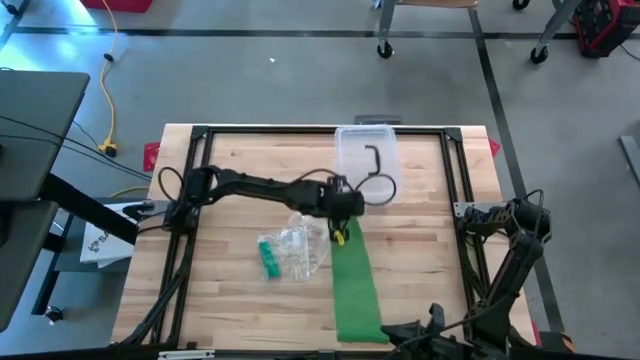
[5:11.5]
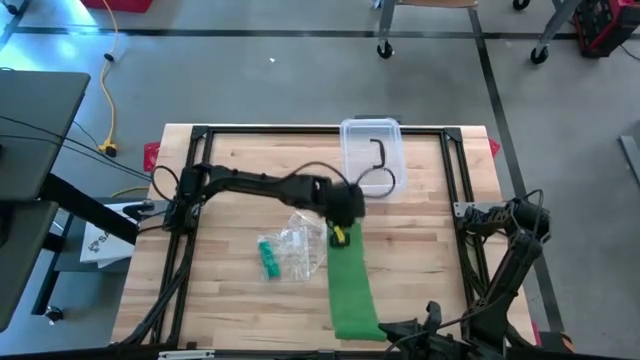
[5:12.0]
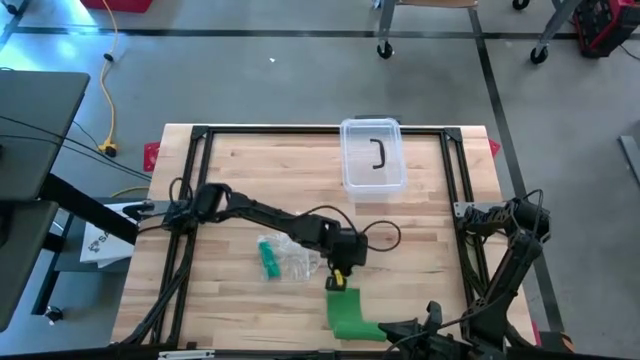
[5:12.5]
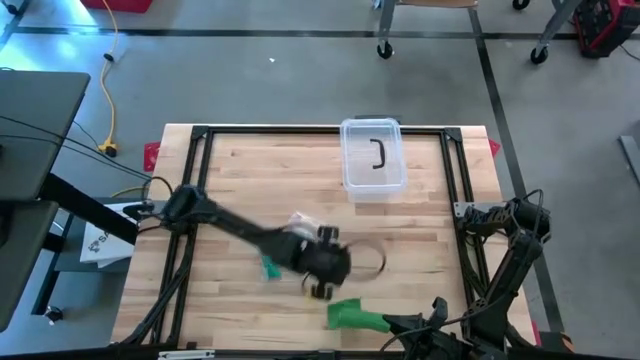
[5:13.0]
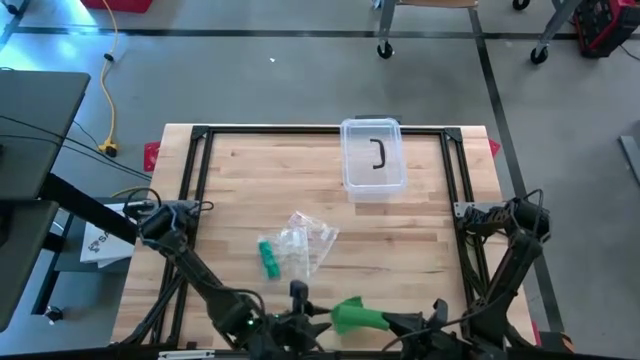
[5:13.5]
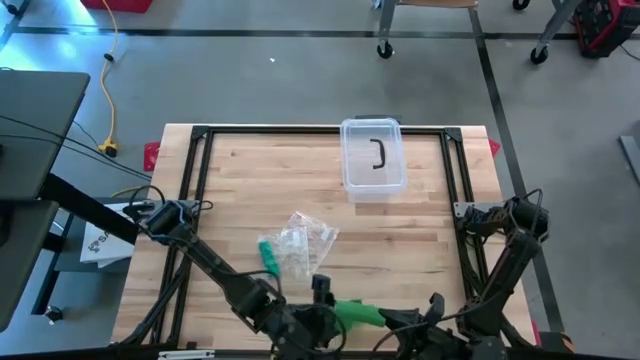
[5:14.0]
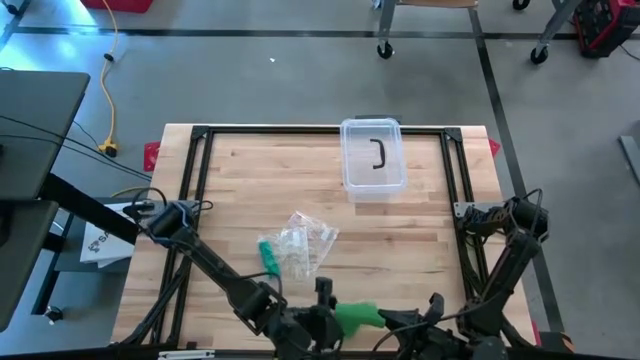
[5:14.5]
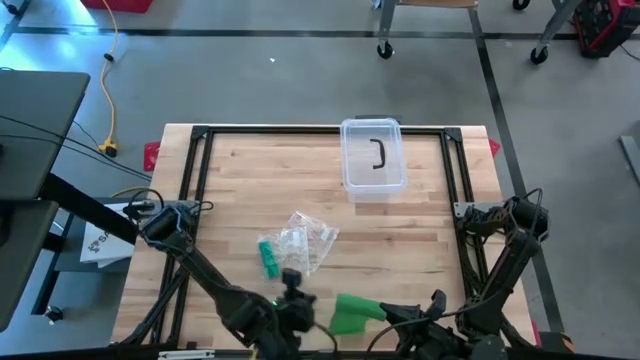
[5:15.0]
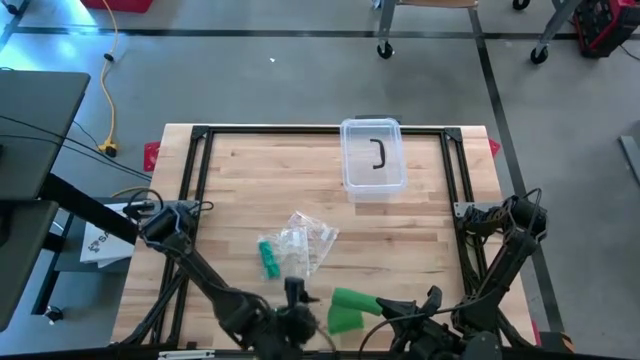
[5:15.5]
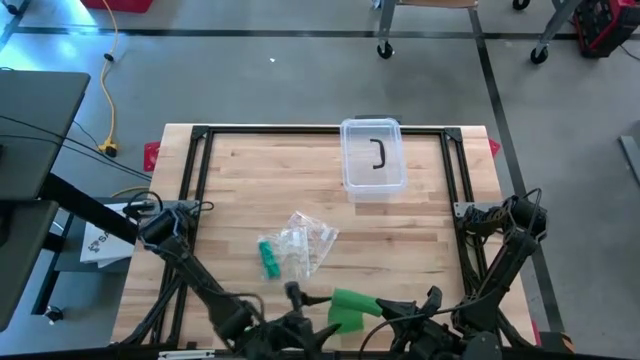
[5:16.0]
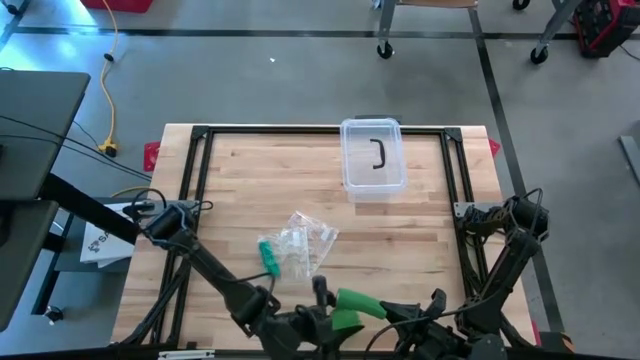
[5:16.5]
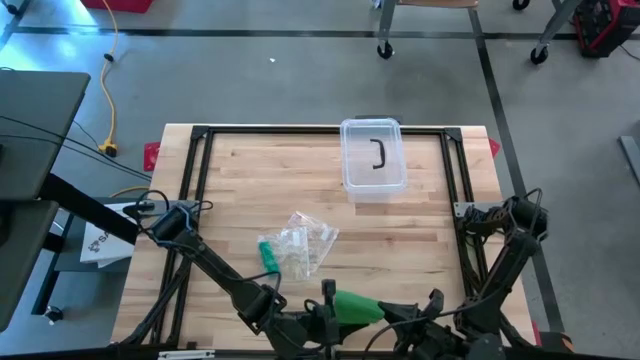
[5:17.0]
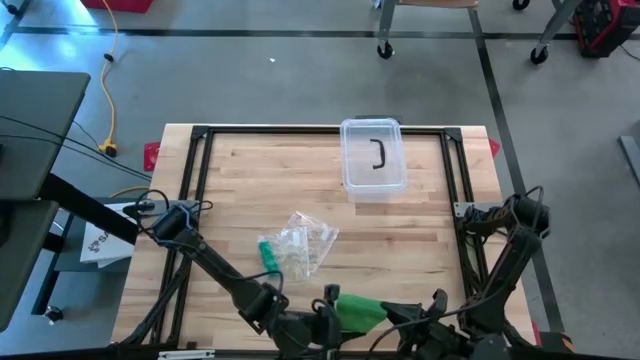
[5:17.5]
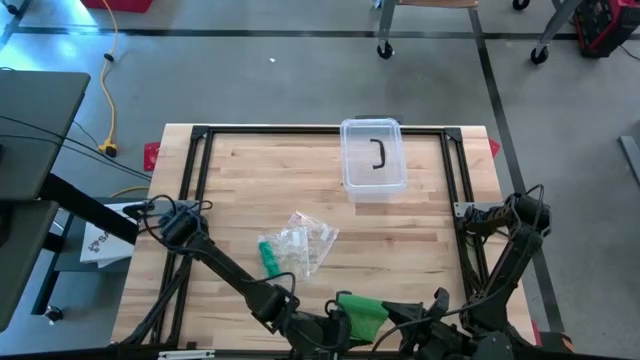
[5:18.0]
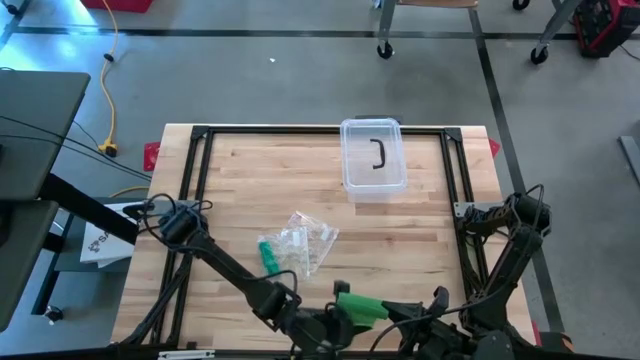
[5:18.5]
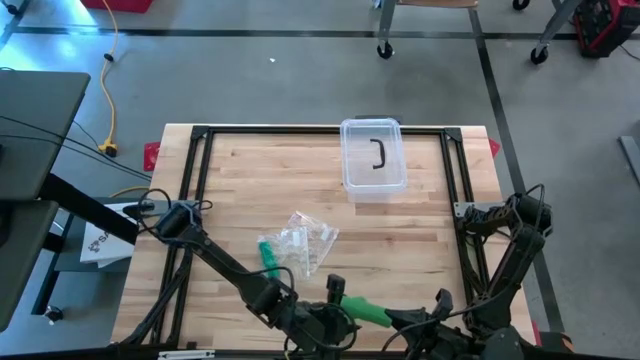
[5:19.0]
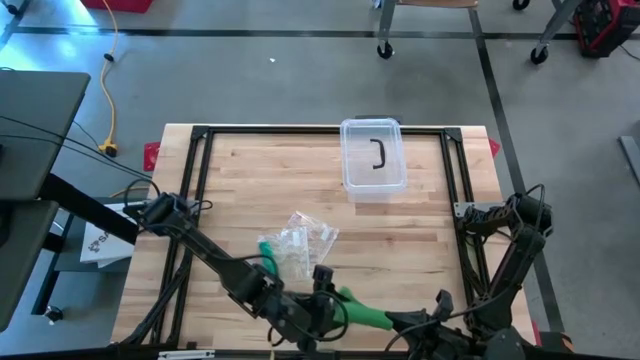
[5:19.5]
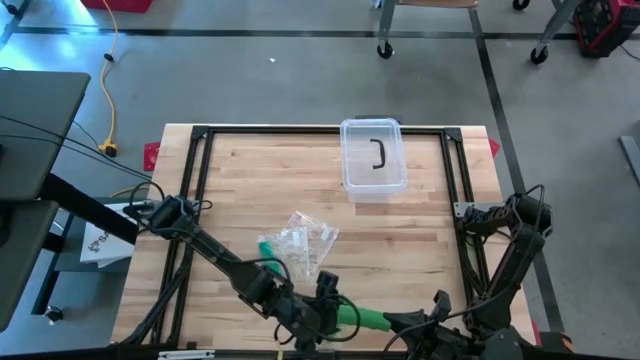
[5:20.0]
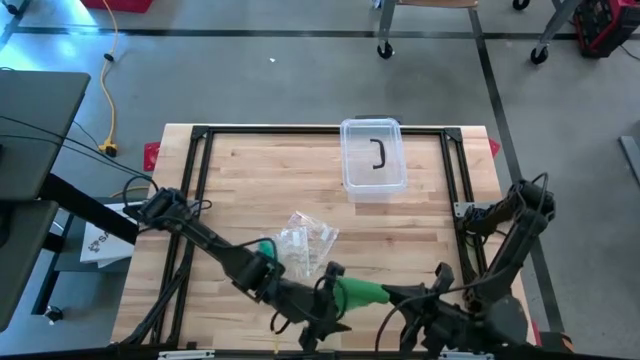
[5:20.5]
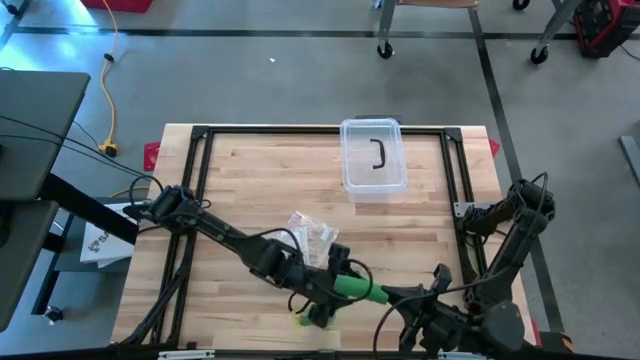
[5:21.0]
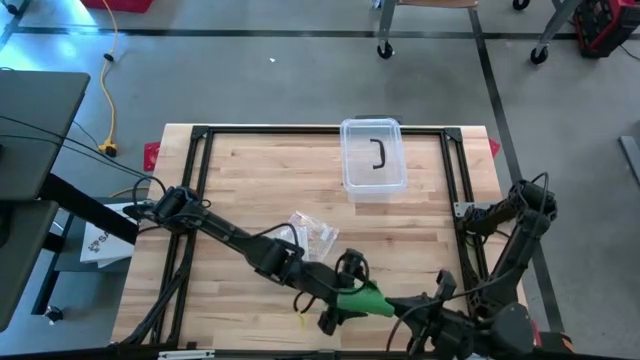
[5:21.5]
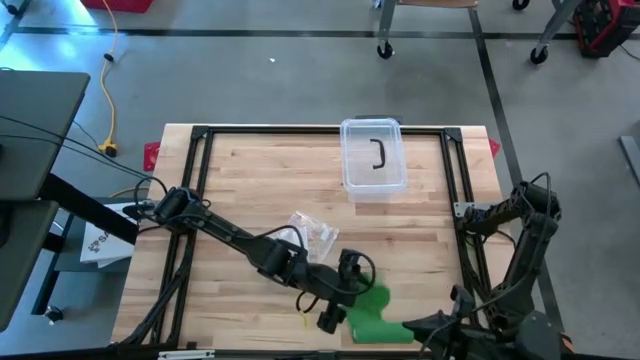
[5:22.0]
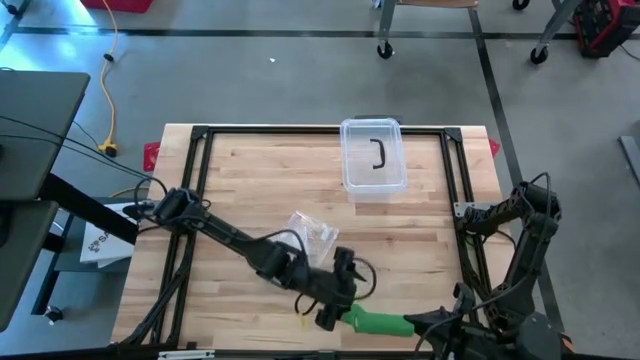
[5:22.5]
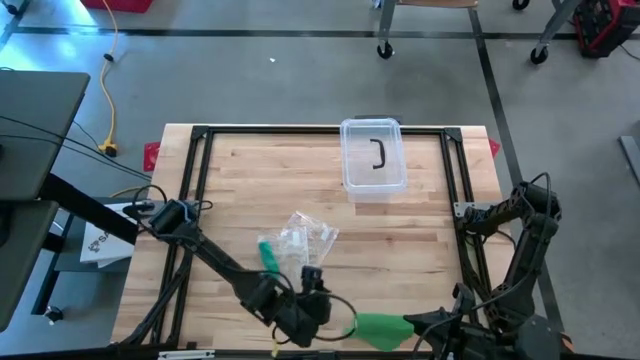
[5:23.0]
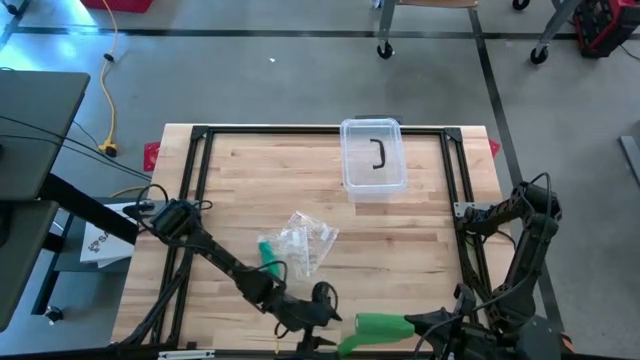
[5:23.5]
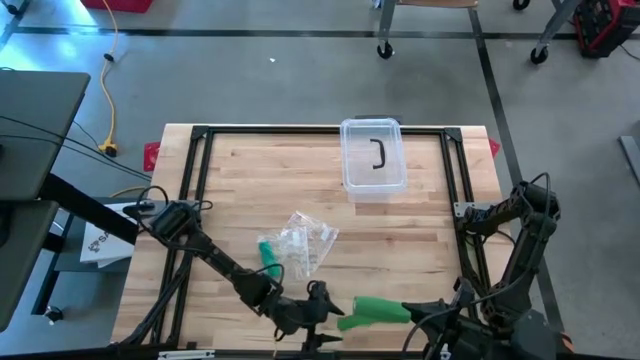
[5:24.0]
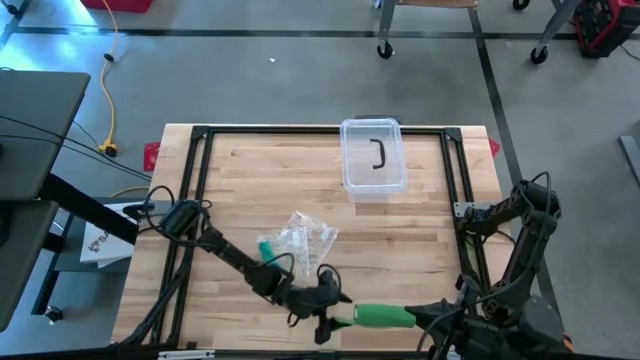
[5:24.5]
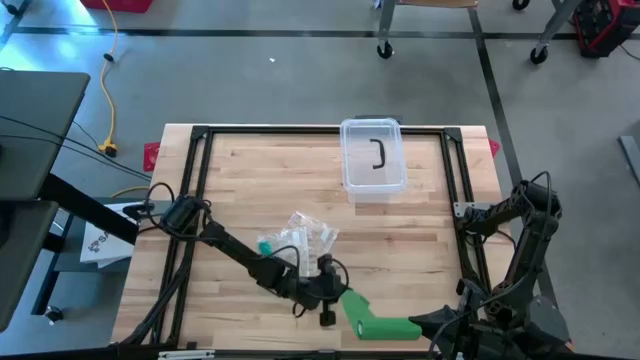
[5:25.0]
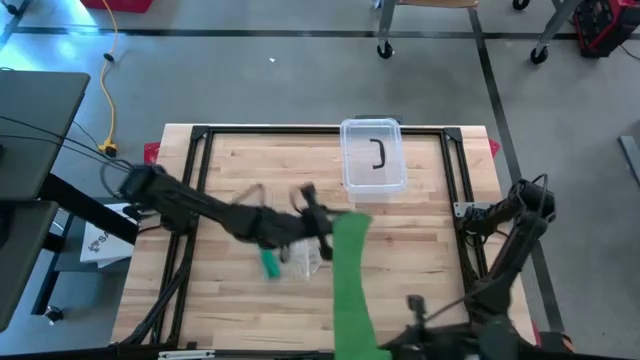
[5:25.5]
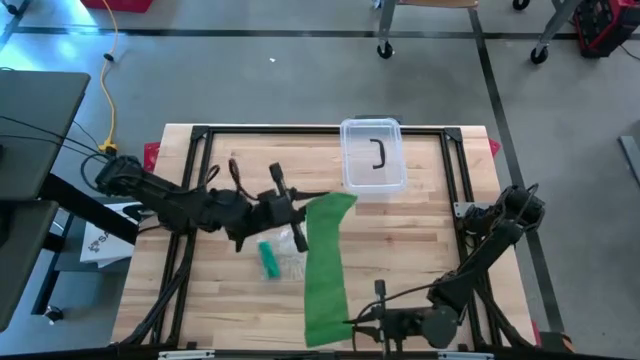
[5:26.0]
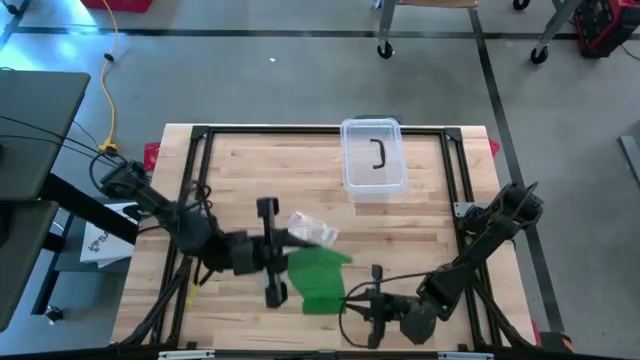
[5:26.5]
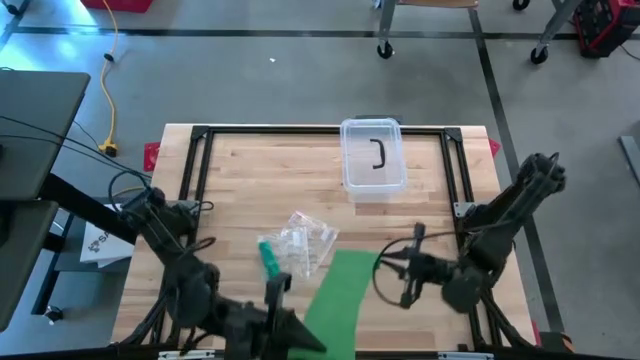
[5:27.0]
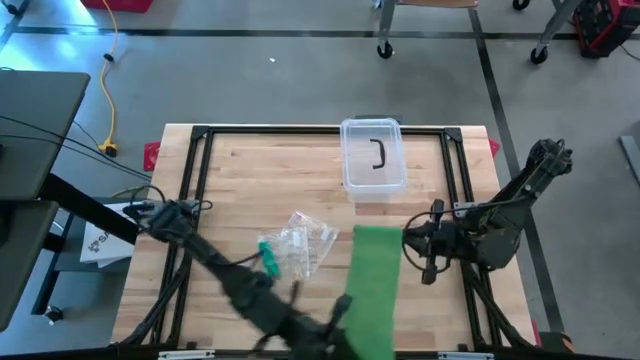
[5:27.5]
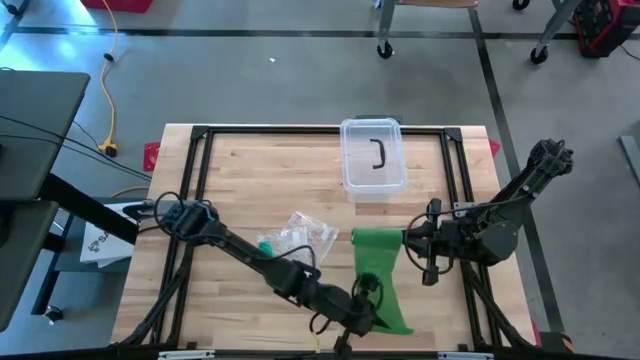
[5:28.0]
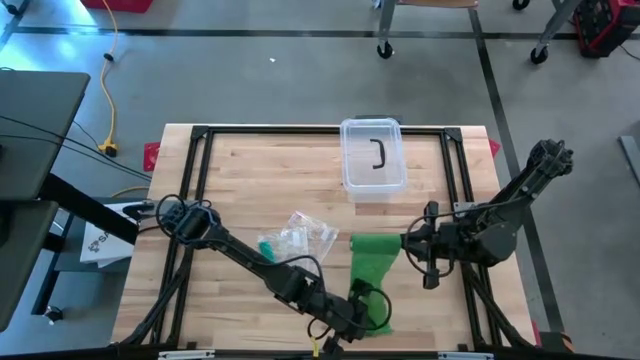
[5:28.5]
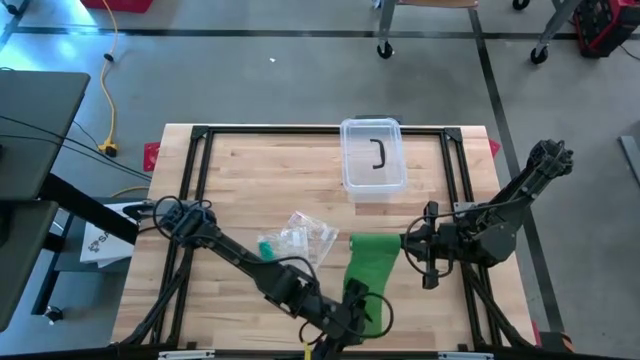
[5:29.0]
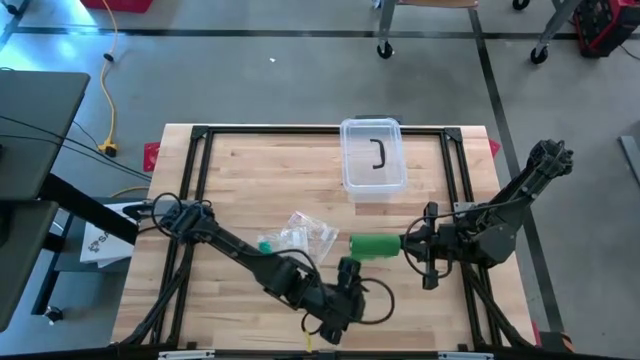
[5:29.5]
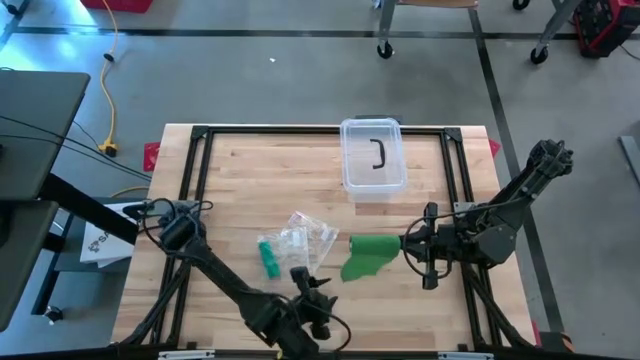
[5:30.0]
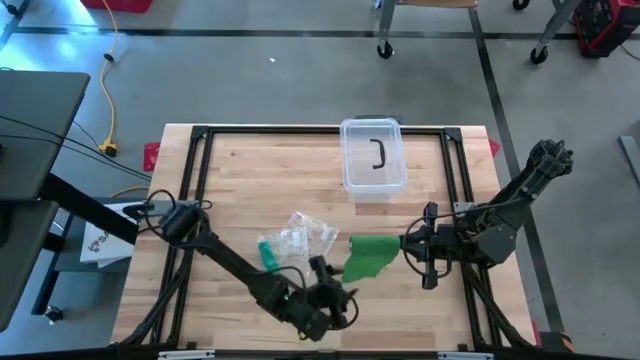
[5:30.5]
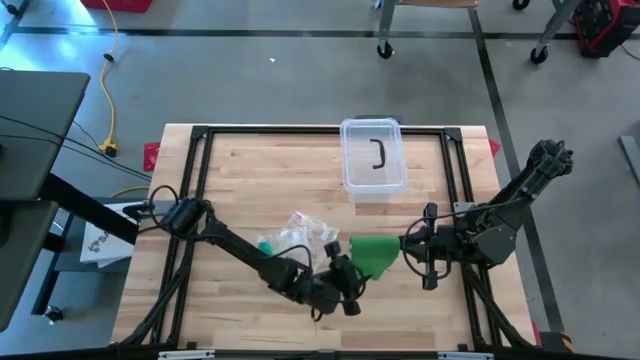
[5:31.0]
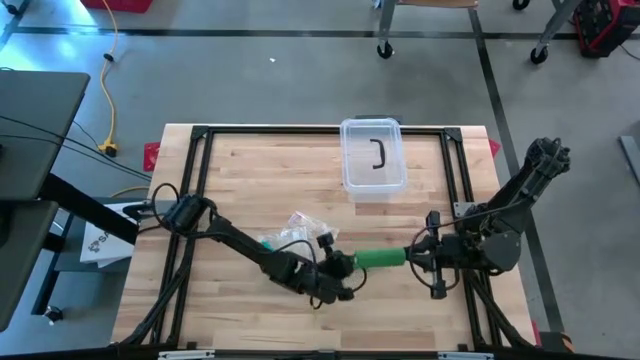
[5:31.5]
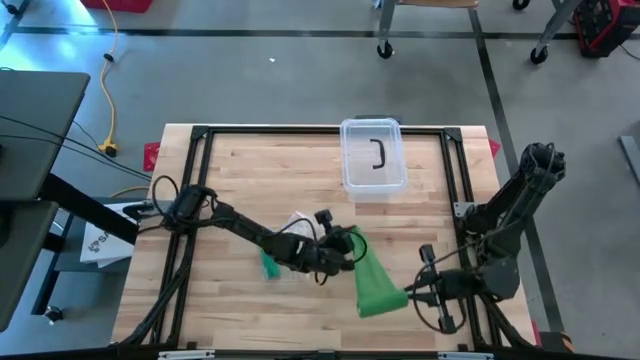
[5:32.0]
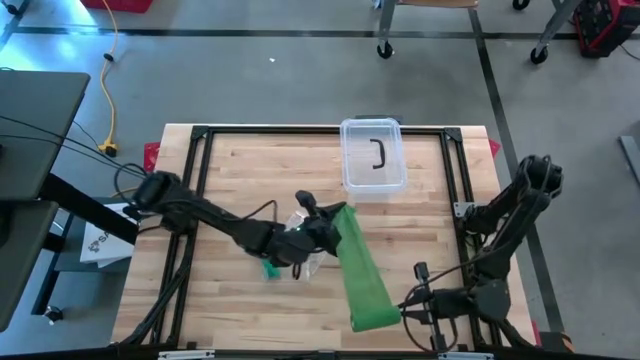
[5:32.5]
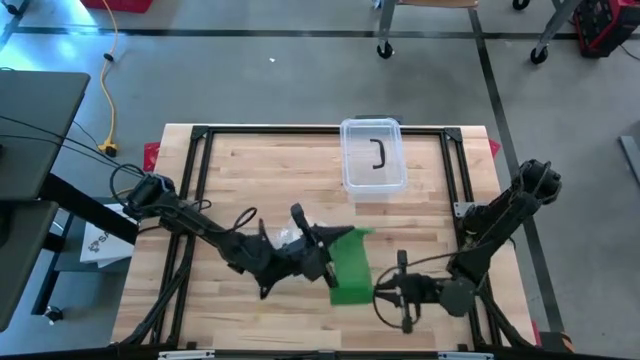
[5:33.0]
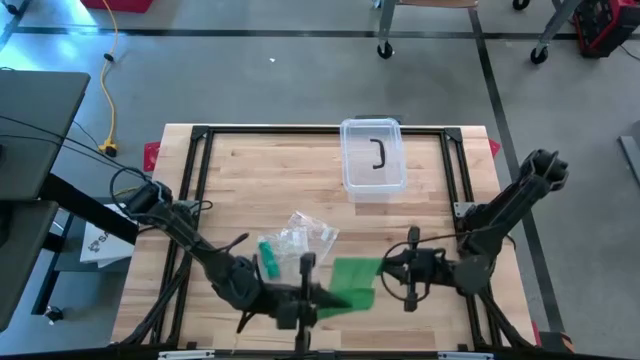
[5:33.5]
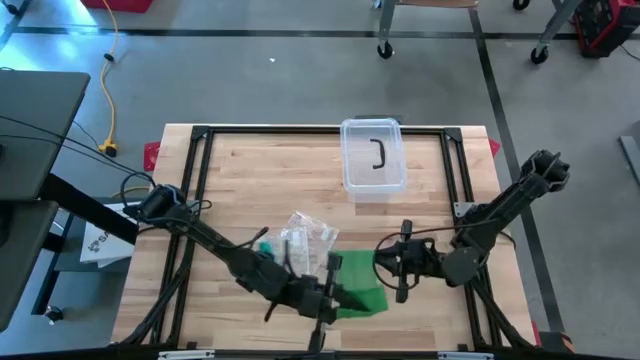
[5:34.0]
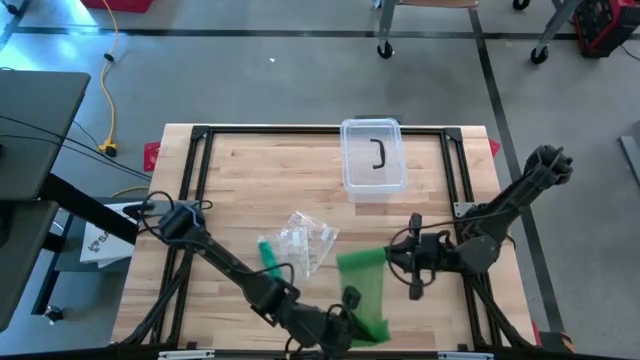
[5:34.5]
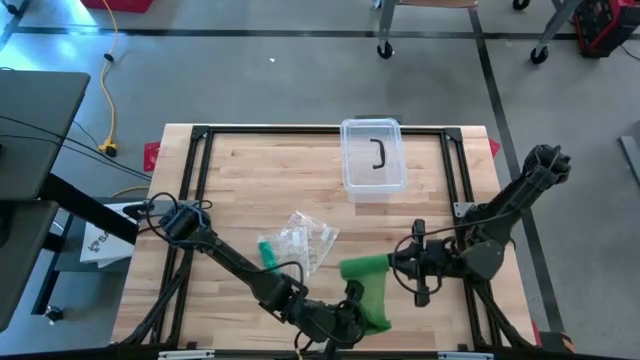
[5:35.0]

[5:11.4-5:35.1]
Task: Roll bandage
Roll the green bandage
